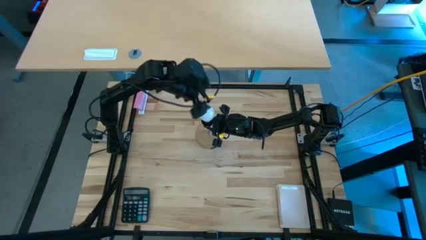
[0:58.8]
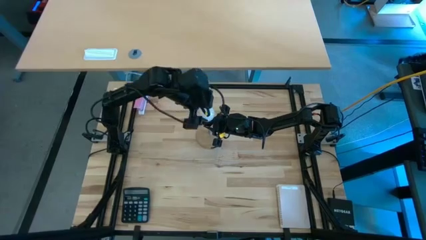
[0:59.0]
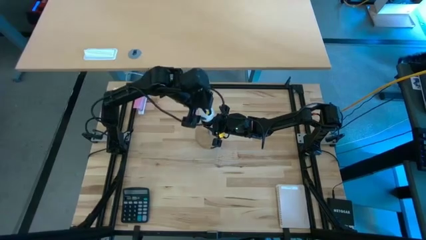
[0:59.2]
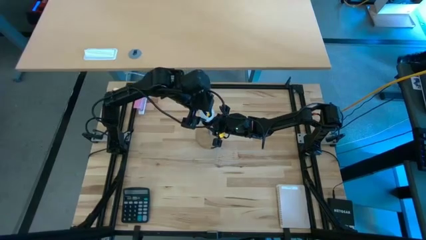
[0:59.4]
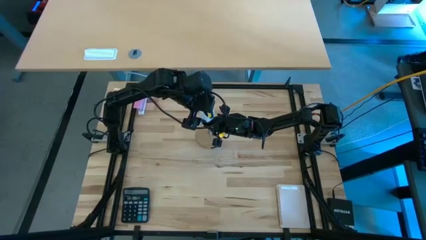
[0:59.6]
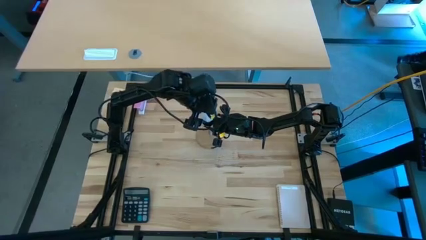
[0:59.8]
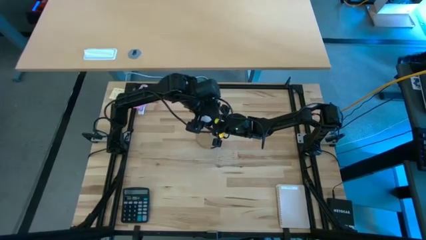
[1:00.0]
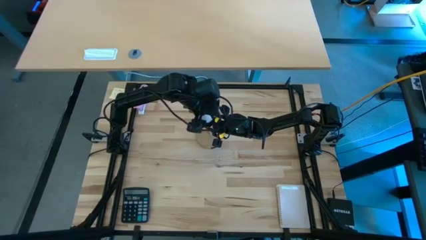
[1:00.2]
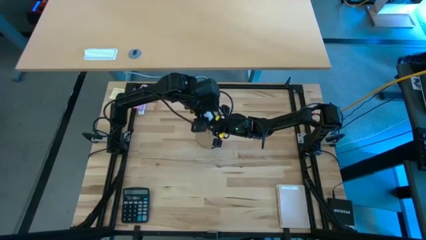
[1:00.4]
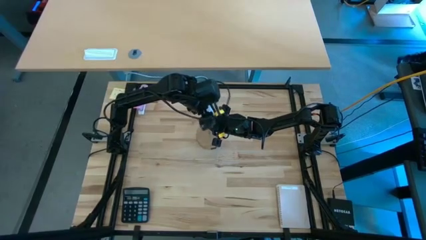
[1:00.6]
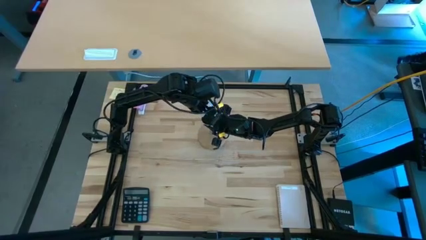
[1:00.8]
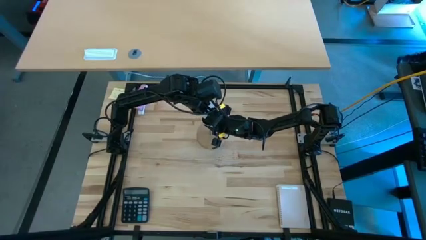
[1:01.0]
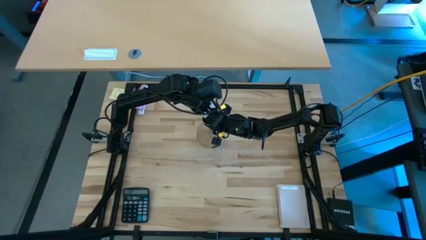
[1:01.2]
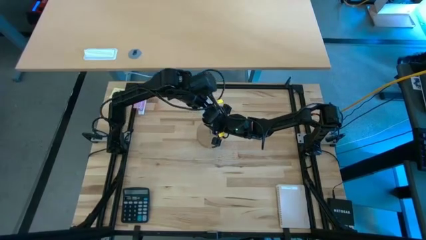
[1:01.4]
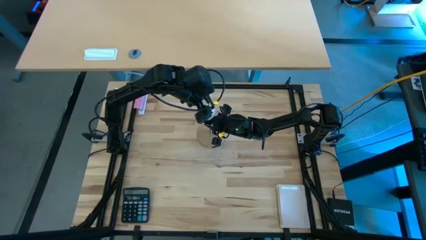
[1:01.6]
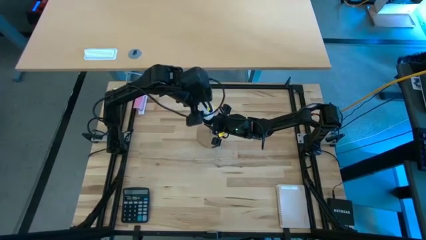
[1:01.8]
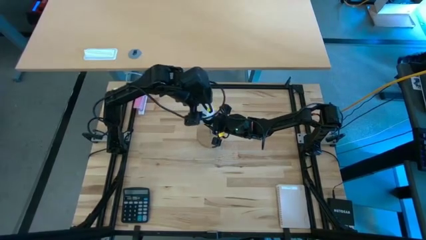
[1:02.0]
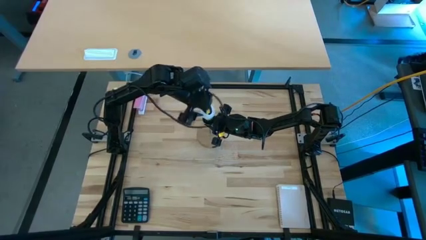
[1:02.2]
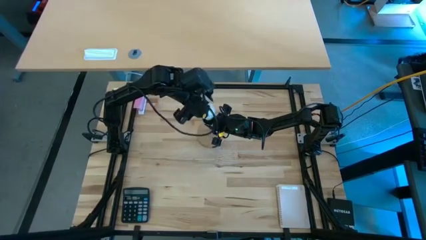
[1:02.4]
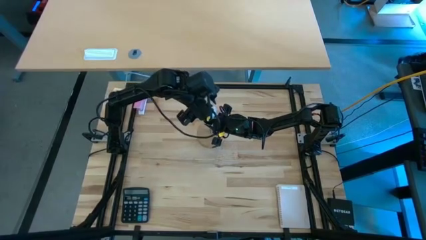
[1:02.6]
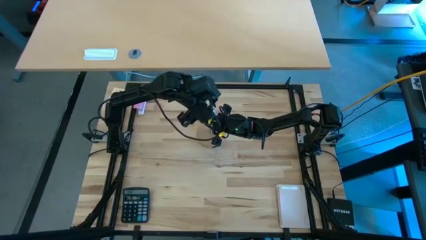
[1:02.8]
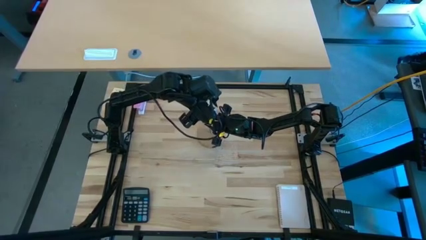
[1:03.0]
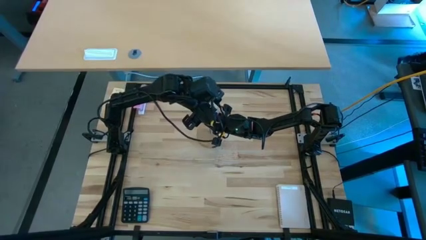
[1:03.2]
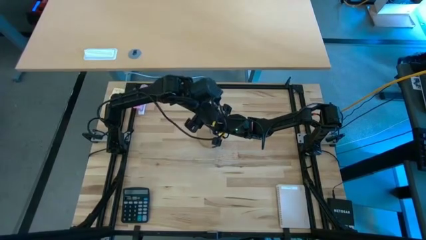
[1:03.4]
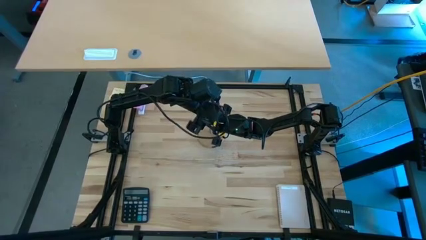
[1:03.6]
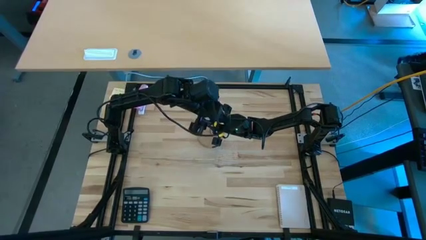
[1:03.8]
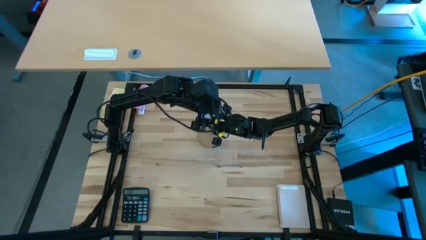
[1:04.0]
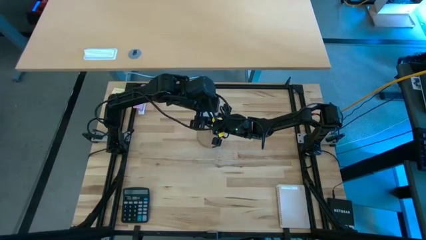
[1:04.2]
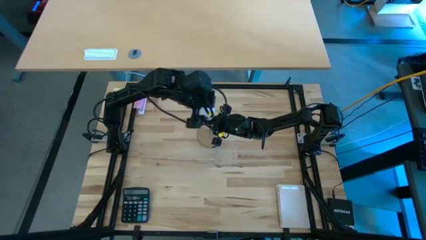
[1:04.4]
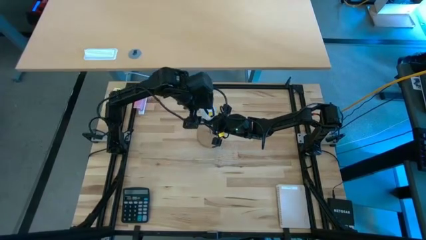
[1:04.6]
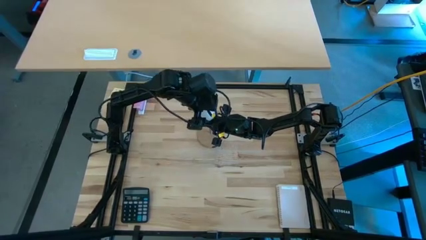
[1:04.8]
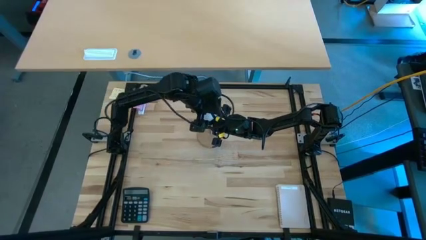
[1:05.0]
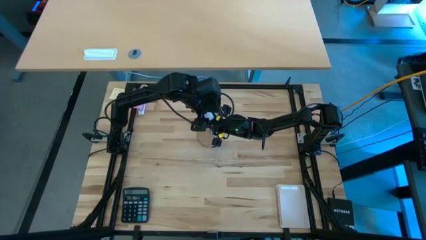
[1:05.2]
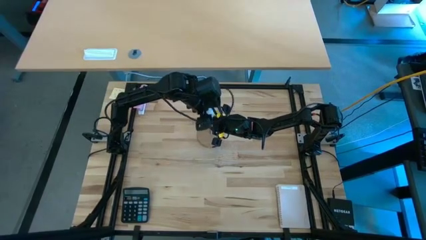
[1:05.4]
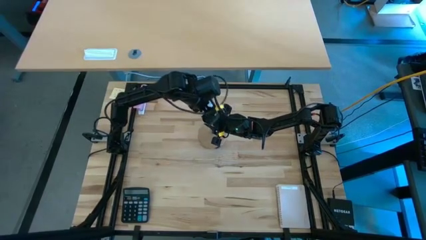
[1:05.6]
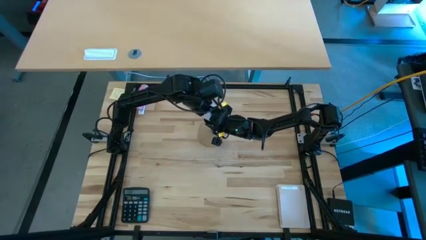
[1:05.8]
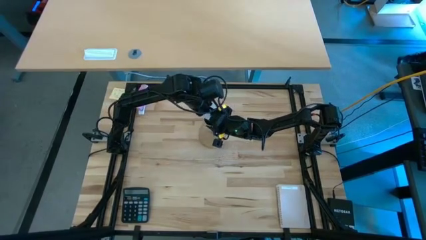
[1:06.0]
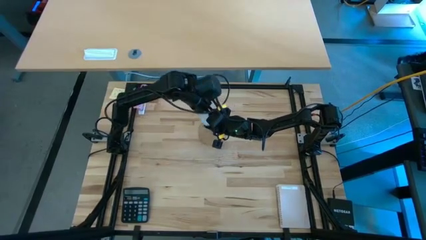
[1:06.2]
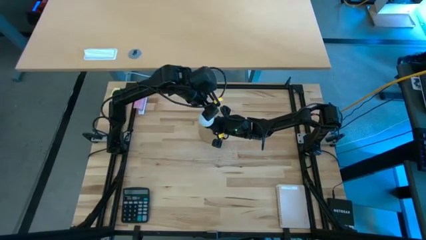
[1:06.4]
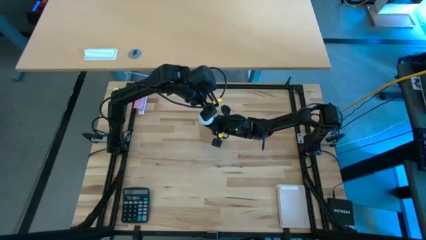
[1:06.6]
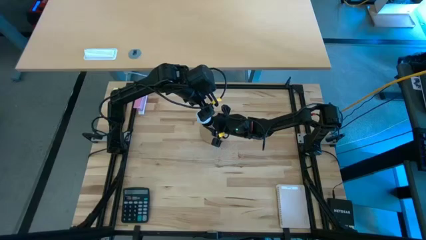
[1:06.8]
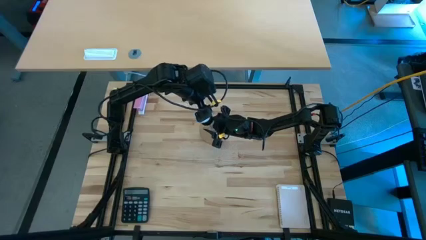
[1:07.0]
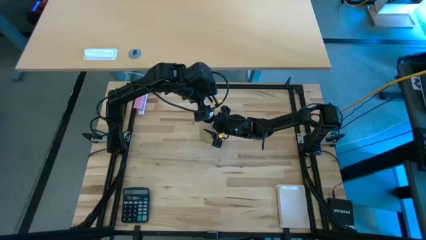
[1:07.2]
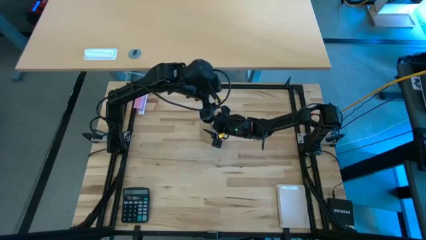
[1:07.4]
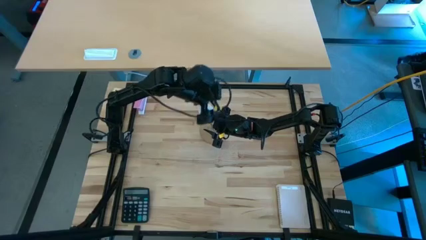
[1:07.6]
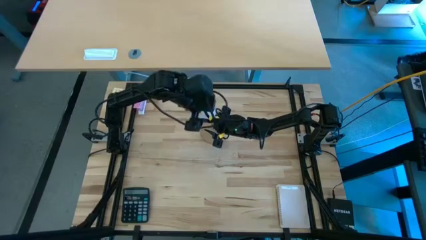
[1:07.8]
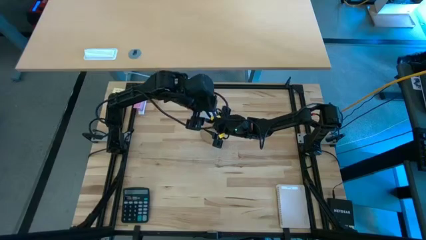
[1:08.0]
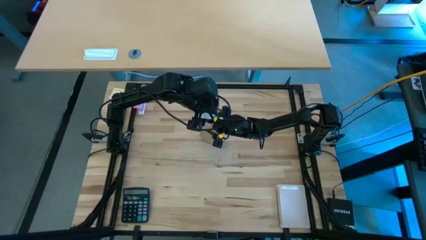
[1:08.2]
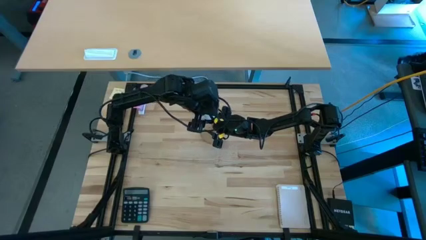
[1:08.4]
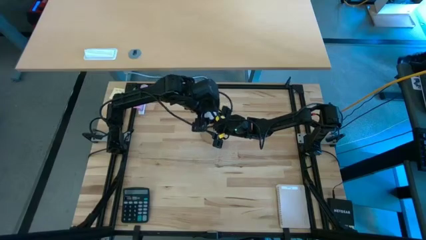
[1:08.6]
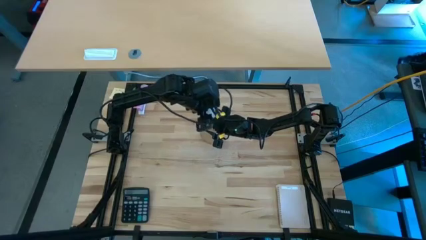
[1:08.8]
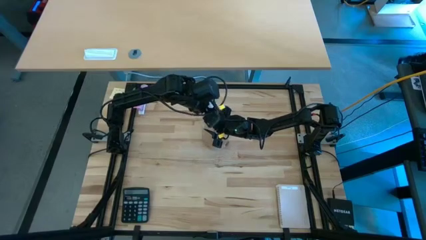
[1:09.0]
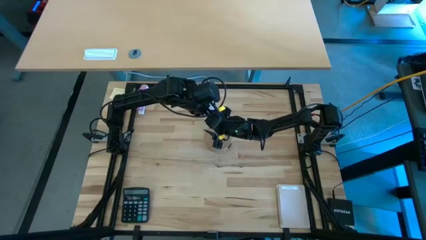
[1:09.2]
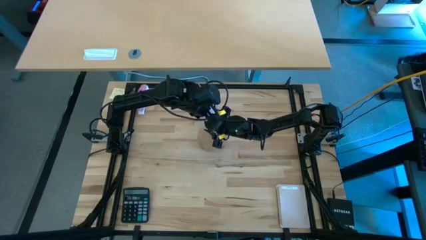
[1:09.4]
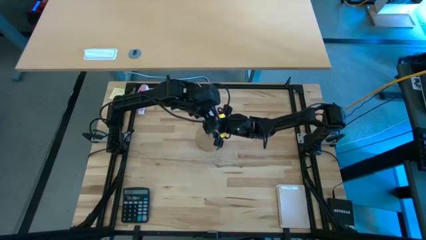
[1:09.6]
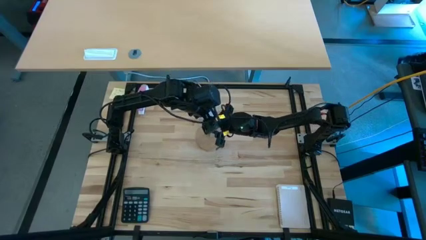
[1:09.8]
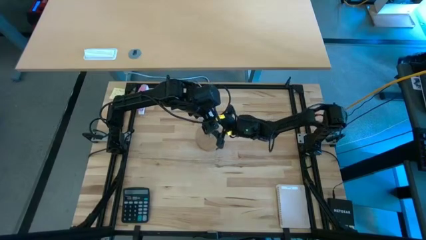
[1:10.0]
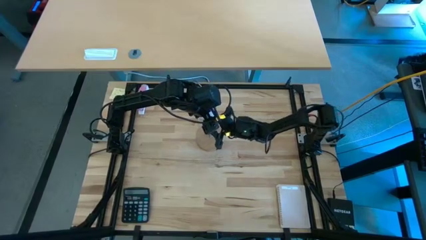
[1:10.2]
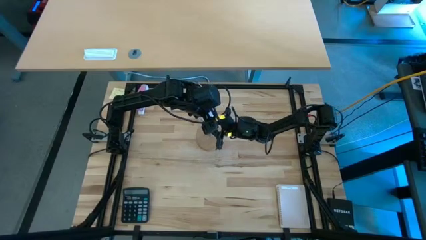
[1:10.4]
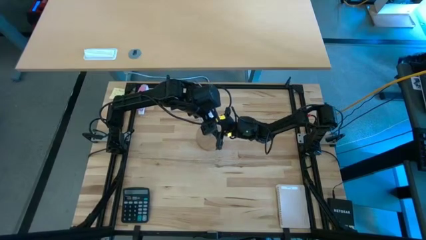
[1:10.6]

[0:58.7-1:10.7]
Task: Screw lightbulb
Remove the lightbulb from the lamp

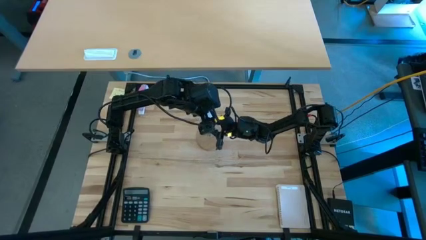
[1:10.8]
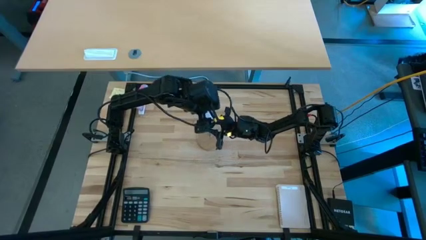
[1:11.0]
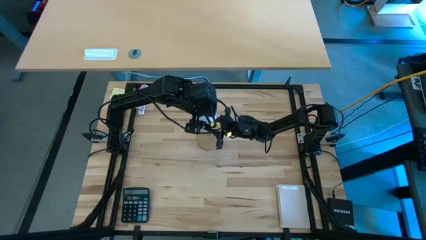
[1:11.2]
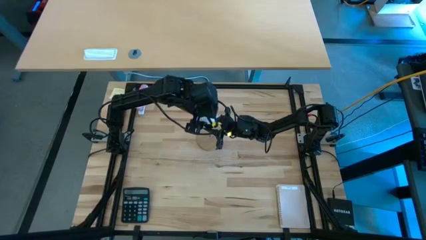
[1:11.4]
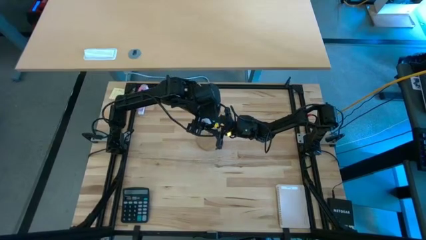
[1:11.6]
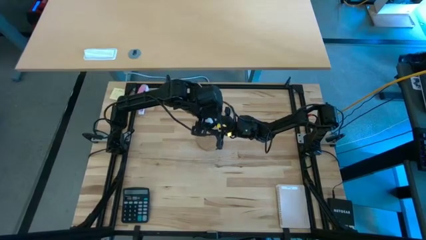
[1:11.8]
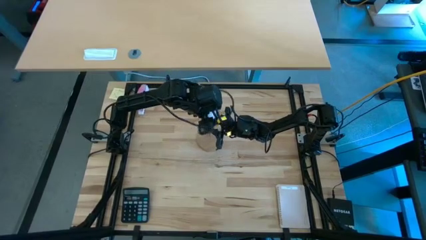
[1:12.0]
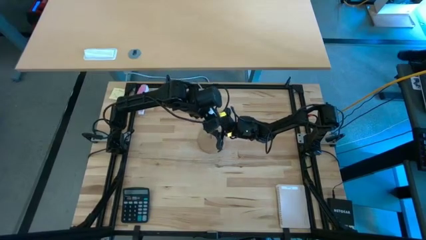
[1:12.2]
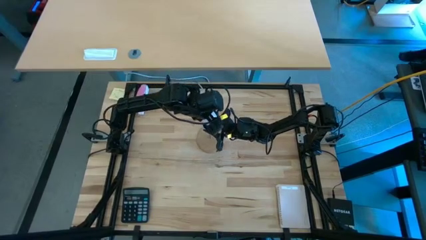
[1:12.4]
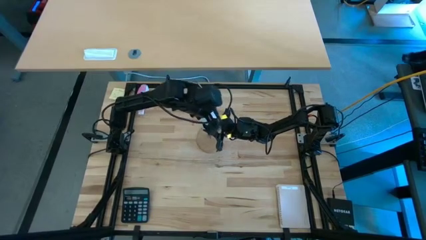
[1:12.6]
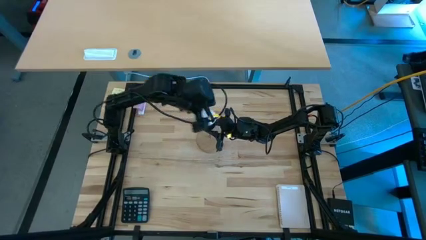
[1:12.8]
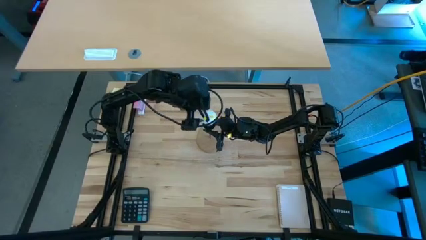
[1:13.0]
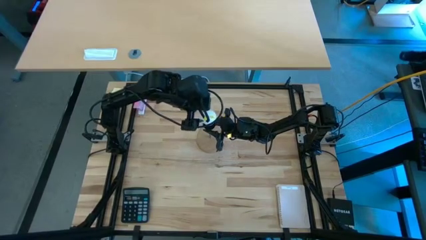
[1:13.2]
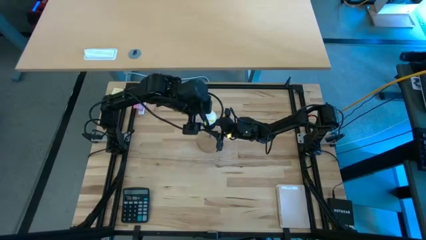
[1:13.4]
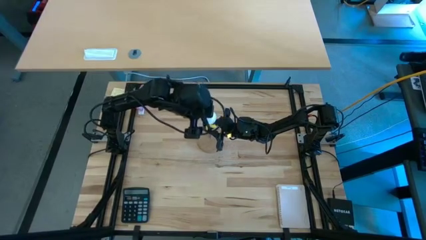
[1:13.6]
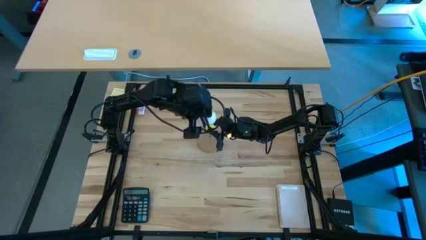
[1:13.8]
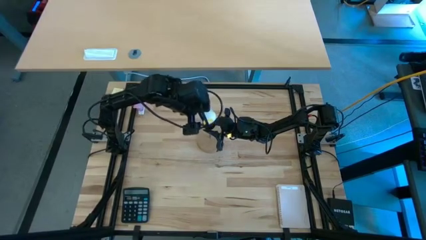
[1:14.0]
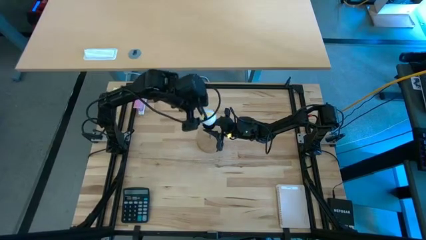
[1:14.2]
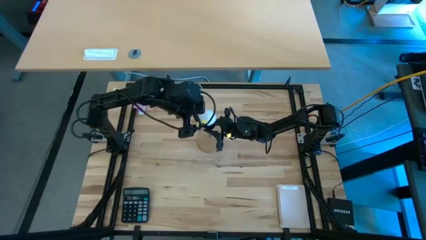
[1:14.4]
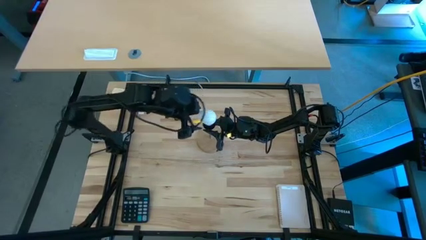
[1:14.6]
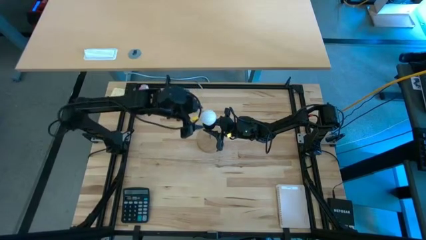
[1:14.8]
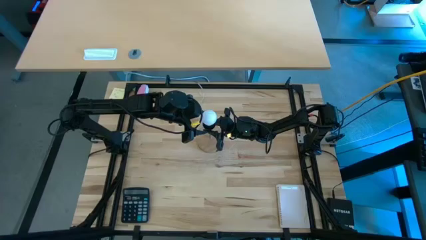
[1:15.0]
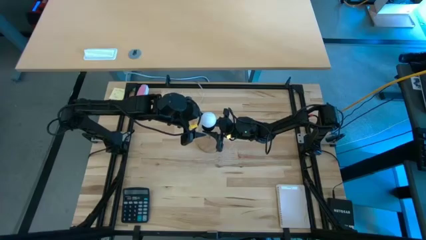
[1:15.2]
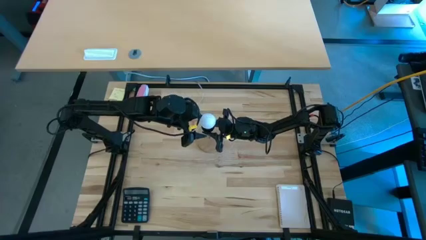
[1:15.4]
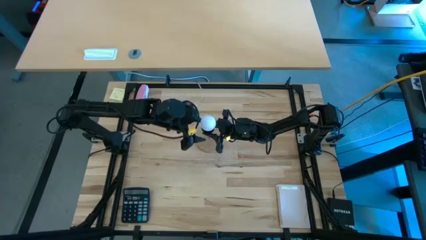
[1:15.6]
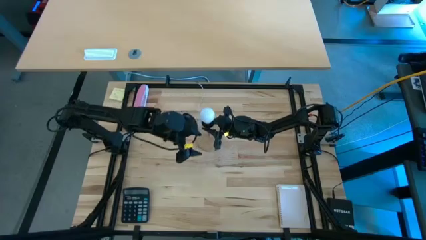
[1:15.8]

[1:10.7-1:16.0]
Remove the lightbulb from the lamp
